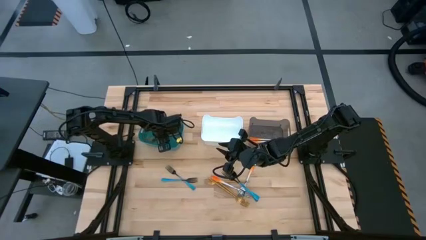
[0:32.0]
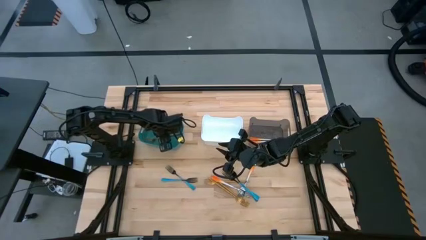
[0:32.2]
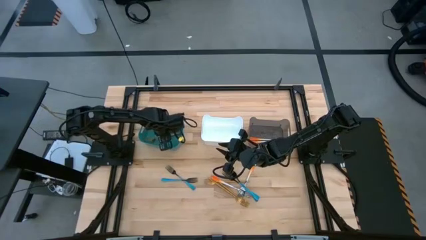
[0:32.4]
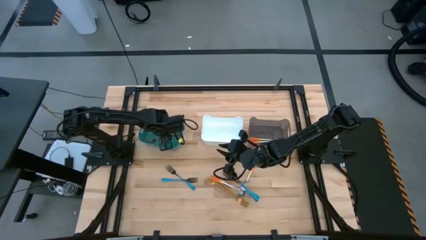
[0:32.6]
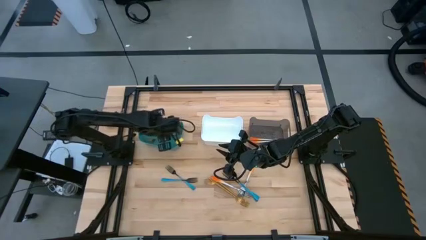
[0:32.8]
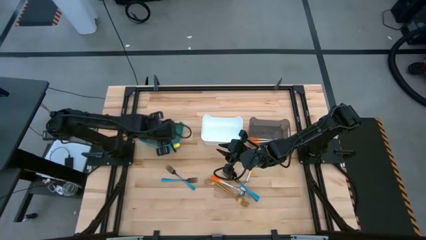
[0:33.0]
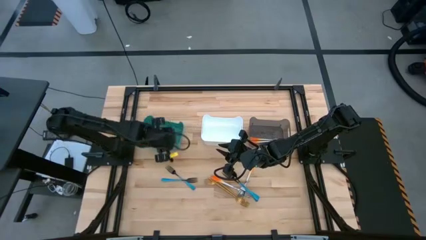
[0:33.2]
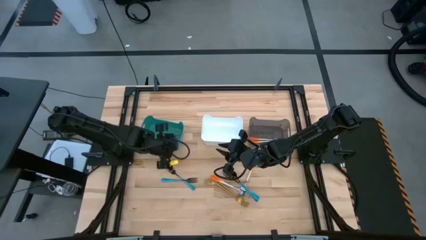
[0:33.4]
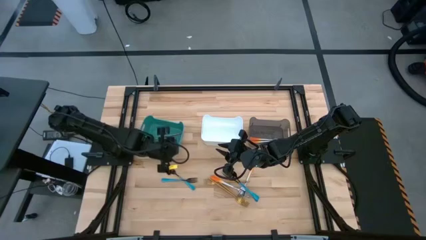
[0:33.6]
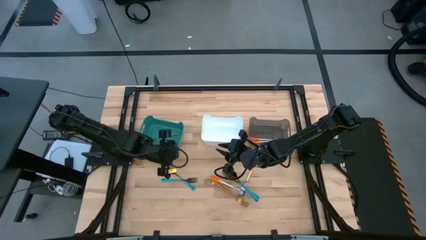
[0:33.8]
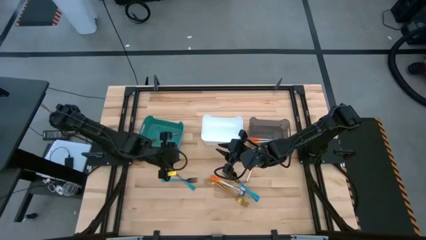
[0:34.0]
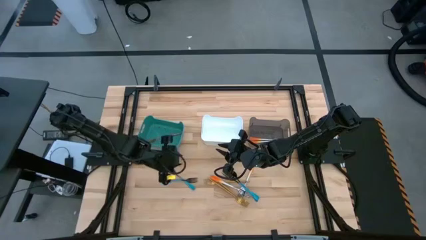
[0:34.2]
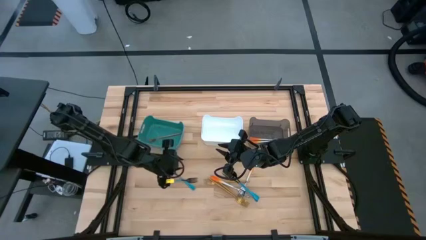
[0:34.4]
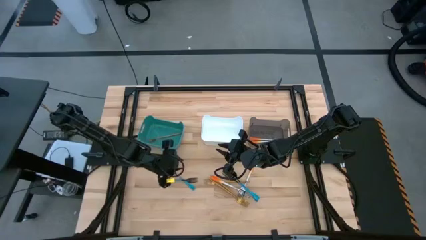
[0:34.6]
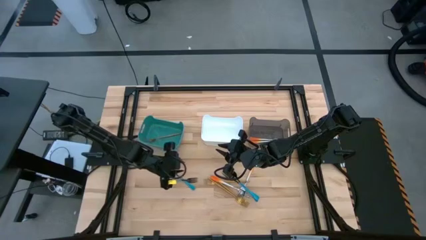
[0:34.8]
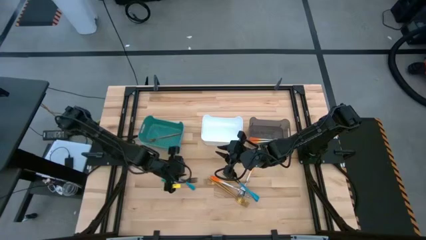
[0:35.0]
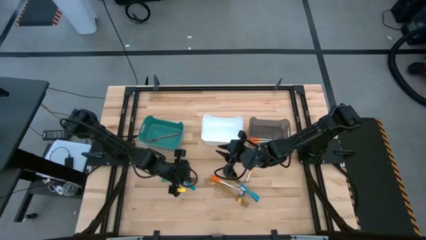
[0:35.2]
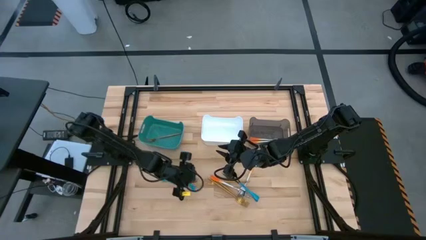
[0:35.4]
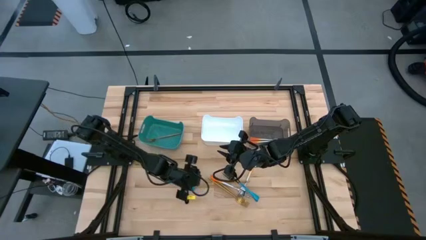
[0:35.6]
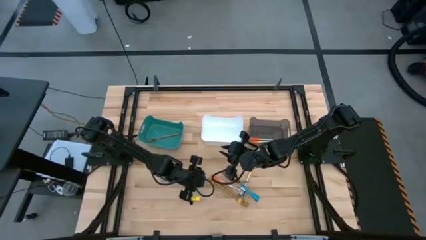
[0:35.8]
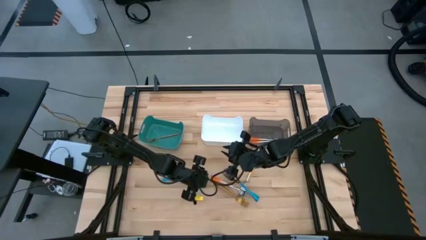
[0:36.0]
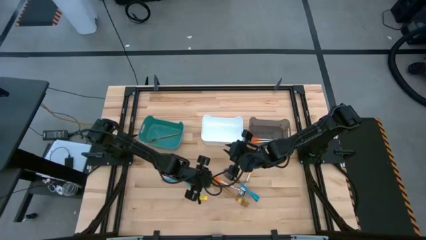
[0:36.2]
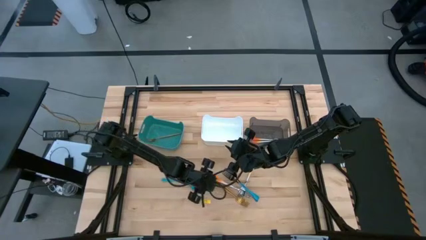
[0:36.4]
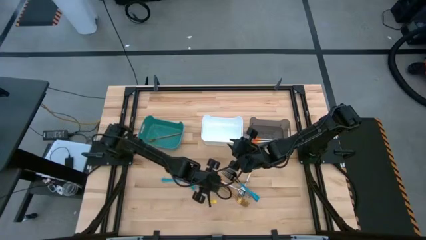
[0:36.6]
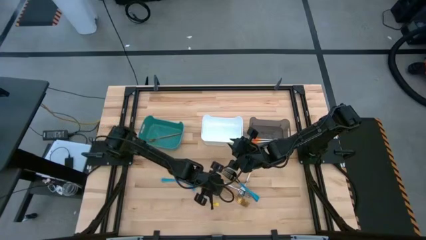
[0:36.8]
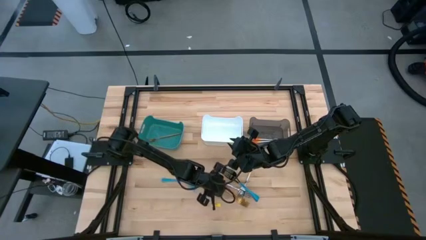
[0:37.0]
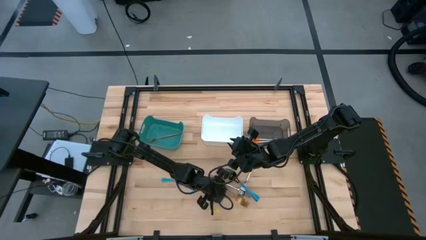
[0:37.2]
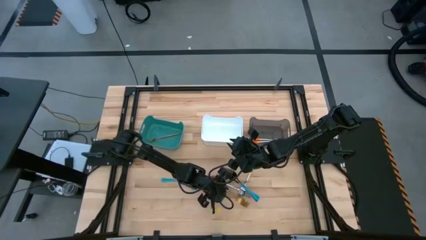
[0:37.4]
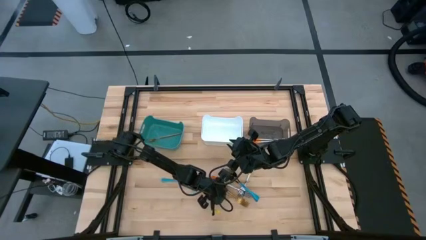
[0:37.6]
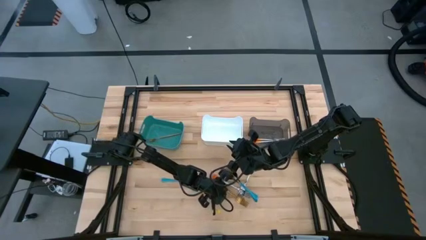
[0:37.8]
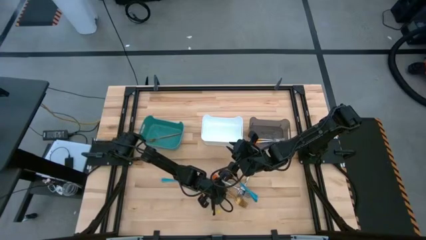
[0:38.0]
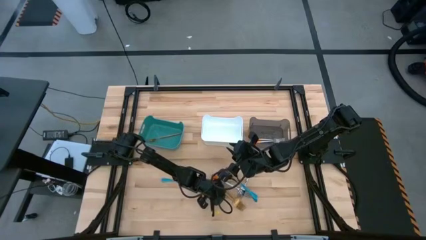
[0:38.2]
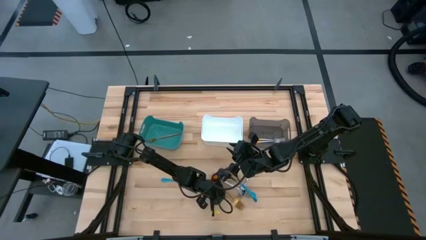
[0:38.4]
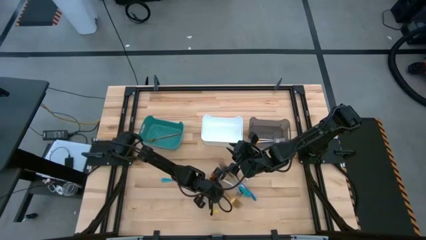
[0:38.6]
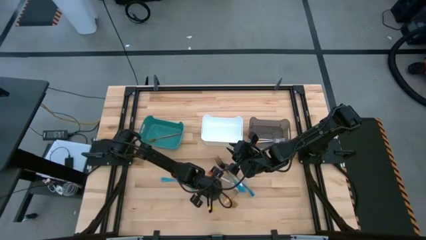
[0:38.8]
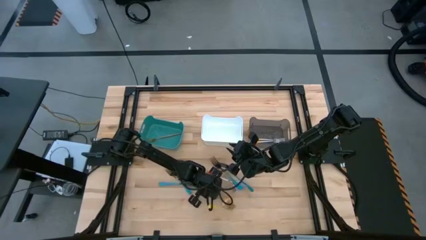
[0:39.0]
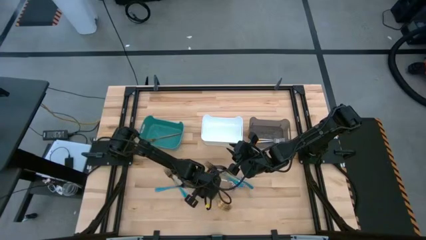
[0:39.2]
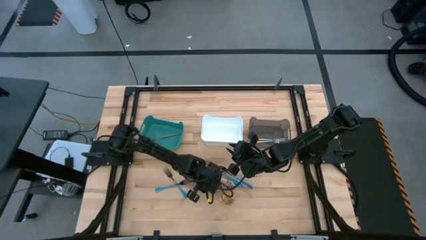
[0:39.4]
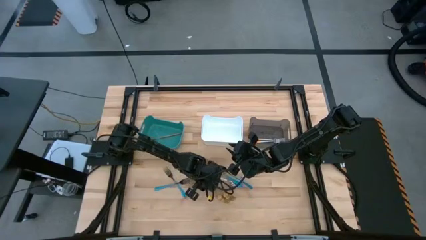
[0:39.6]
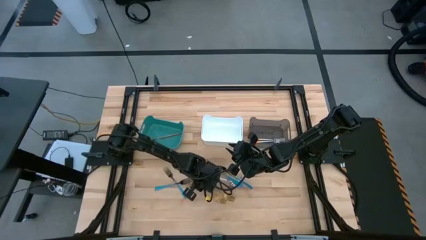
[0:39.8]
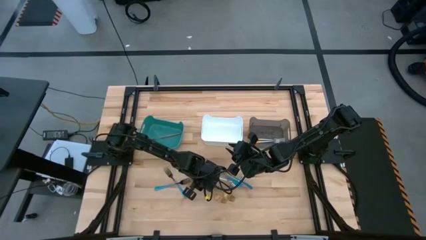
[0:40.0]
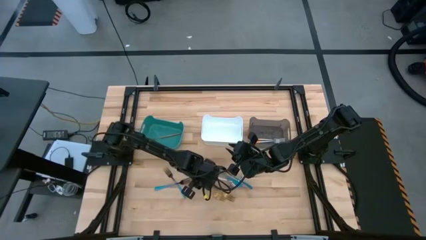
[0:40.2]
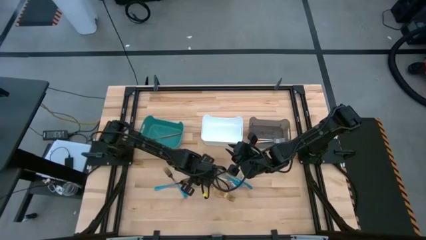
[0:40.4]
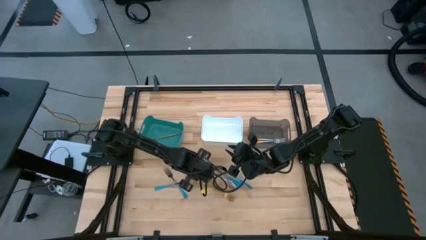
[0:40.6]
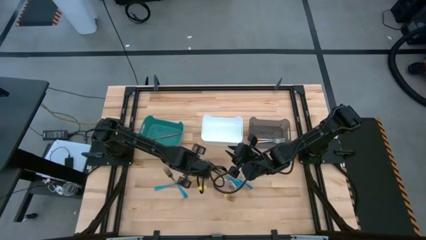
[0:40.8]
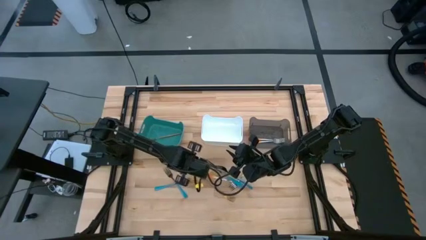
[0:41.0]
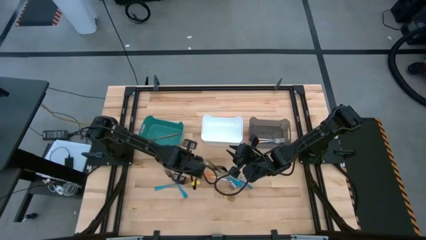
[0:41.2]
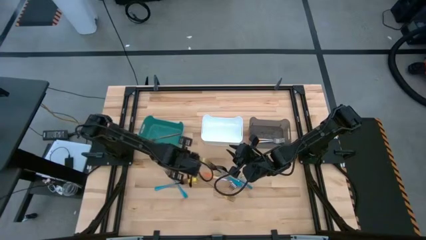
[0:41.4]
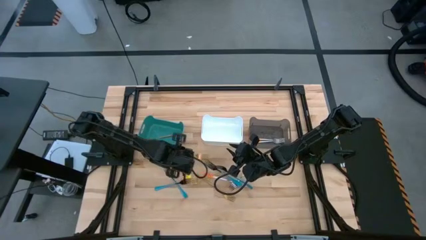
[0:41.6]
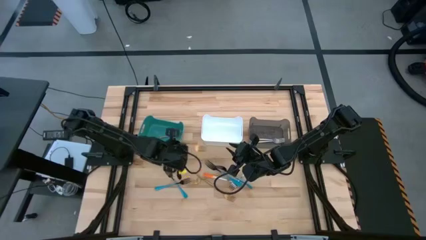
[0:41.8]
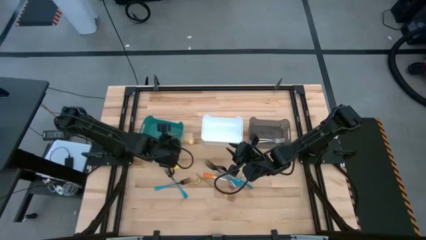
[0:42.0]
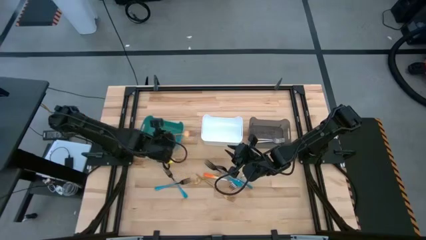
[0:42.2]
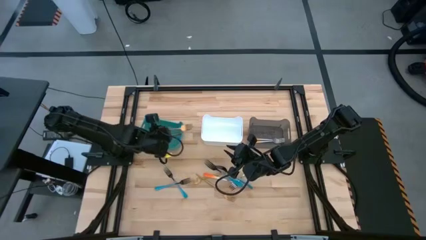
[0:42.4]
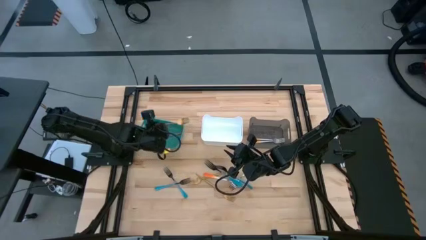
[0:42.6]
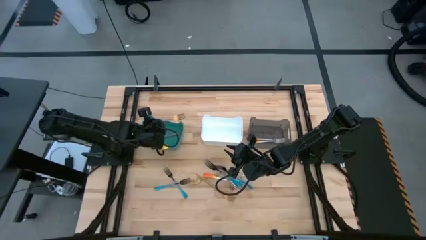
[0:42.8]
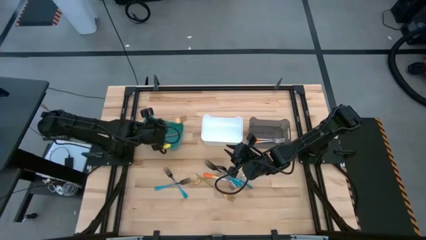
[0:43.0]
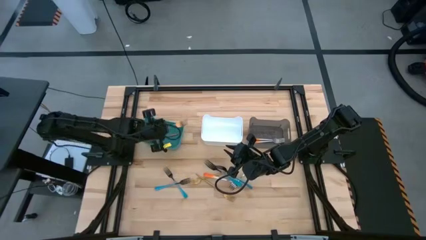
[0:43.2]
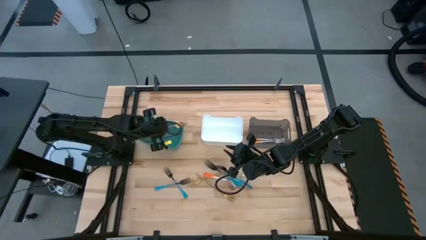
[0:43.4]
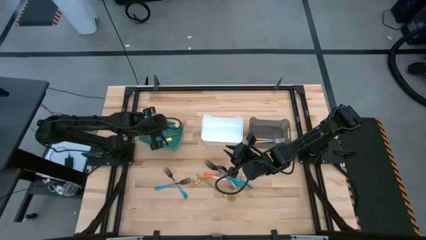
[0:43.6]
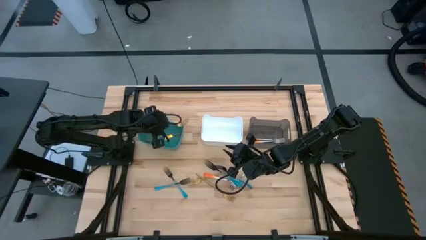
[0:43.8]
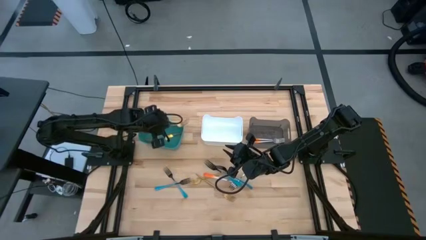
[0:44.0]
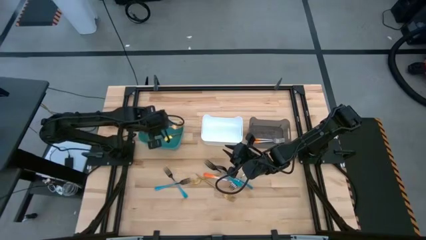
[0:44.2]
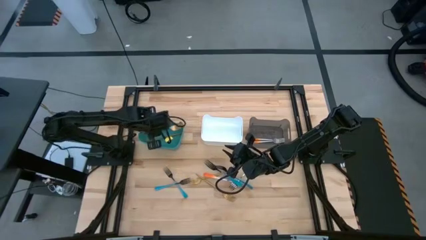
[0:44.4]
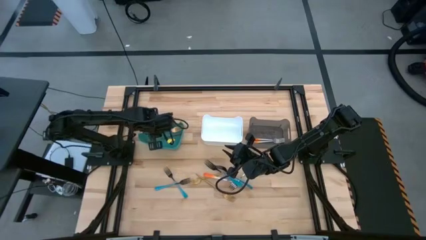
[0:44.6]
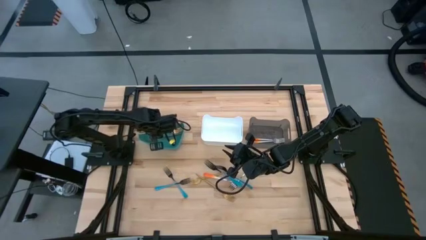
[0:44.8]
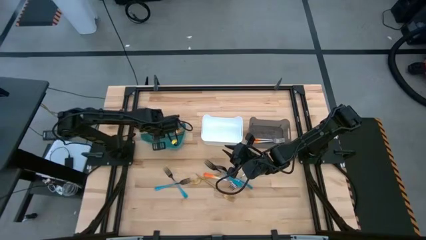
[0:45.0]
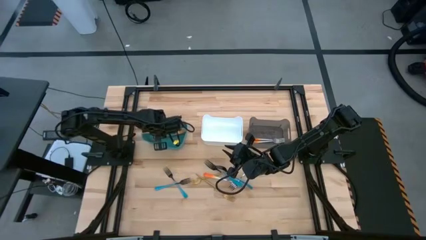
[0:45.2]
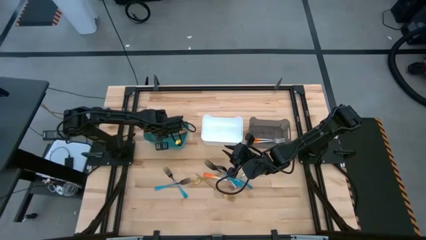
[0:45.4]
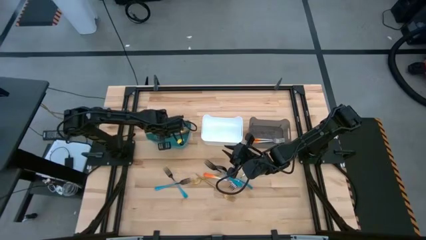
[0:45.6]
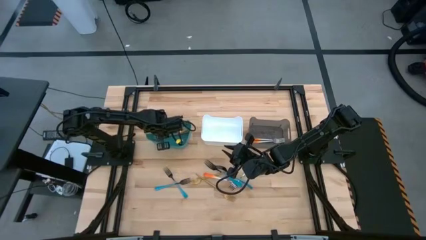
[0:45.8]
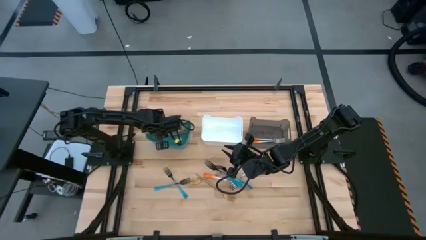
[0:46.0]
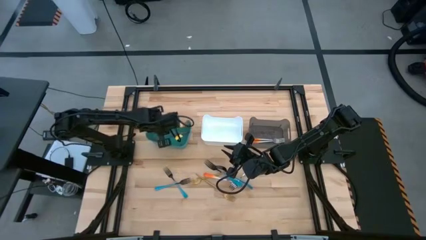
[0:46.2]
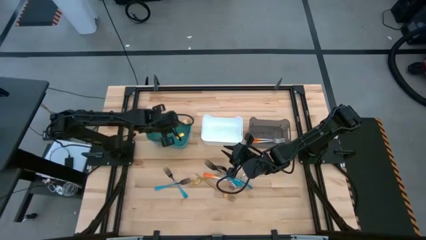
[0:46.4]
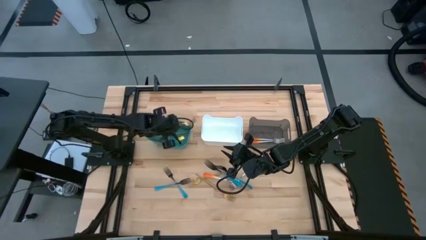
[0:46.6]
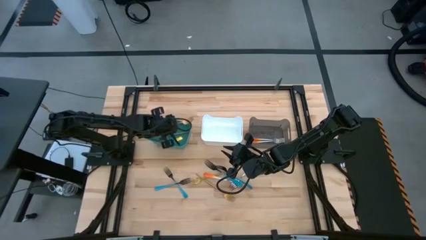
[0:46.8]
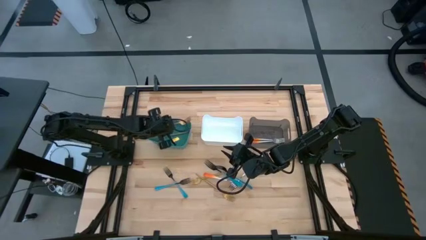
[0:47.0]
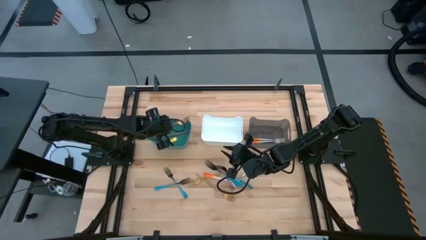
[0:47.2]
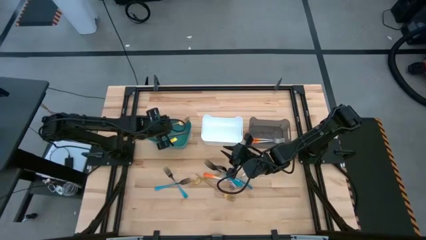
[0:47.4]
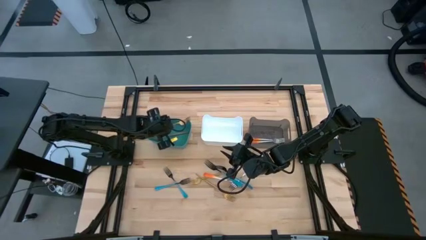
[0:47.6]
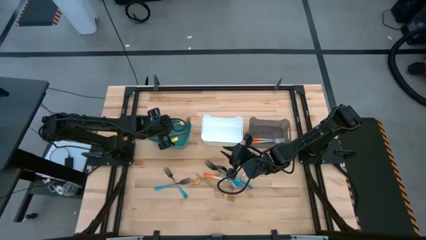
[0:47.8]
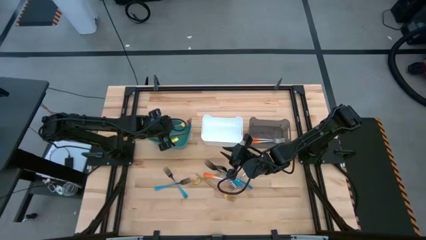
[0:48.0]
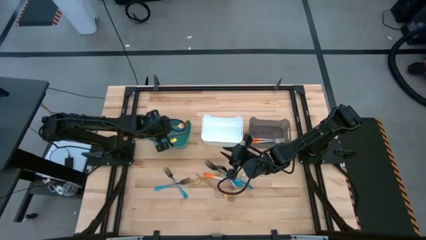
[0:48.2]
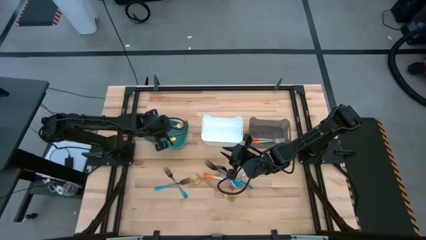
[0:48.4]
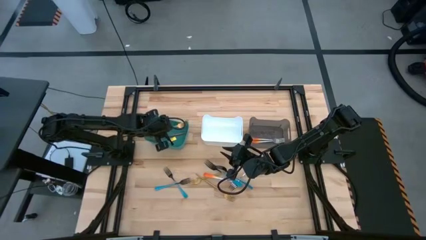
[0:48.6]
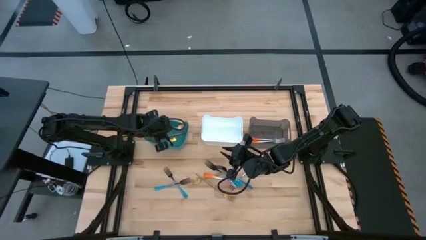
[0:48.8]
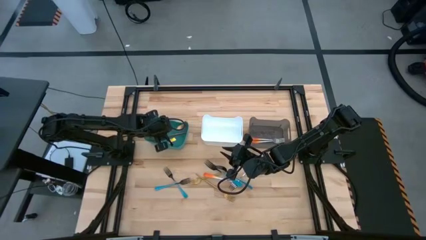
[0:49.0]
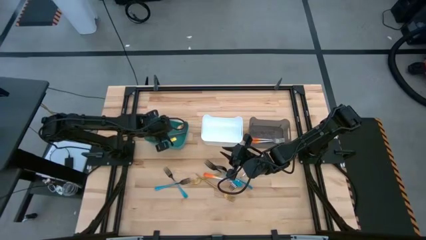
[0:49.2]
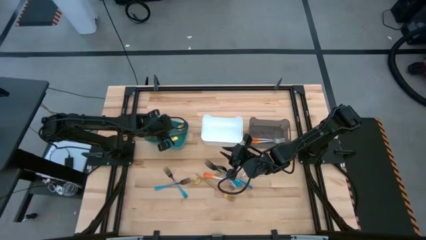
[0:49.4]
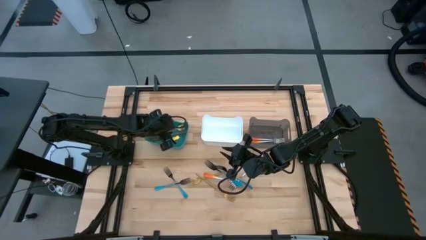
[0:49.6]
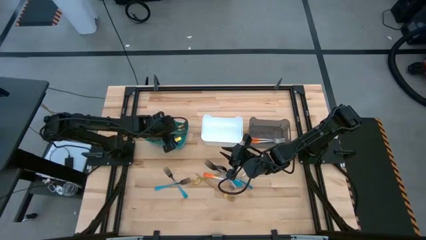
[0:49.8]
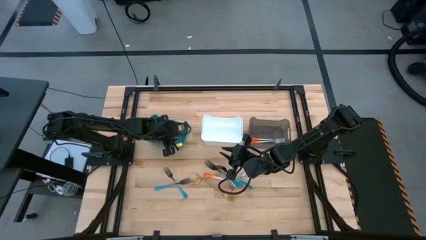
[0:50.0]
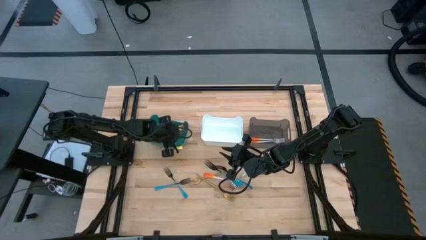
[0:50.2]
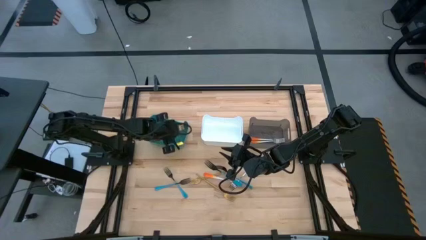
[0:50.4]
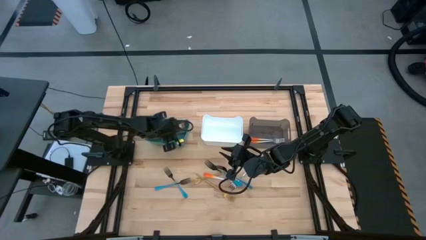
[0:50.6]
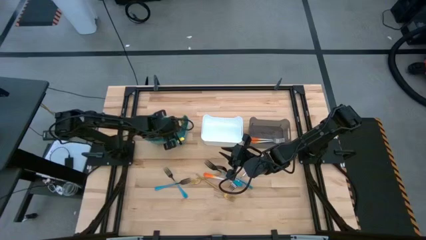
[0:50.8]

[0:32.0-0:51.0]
Task: Sort silverware by color (type)
Put the gold fork into the green bin
